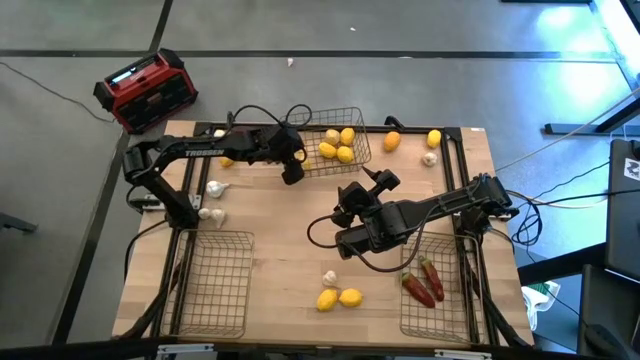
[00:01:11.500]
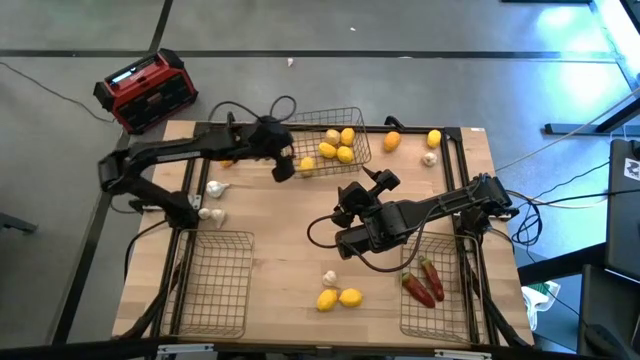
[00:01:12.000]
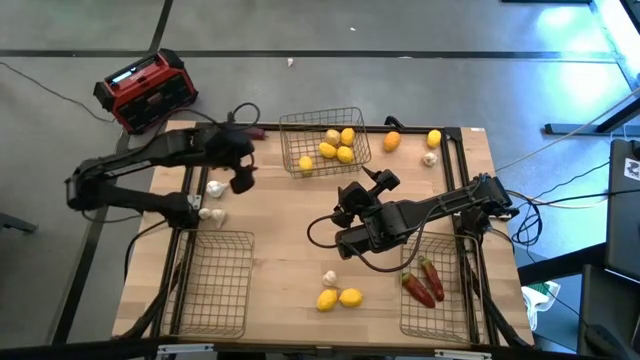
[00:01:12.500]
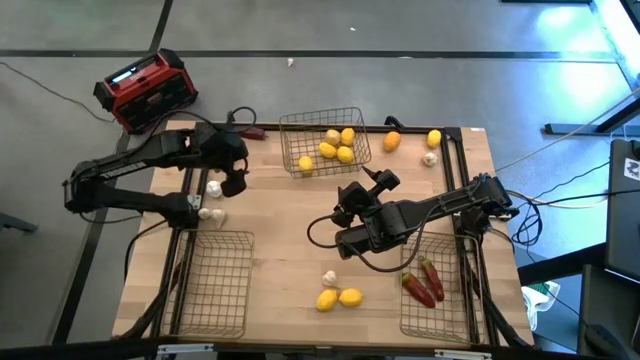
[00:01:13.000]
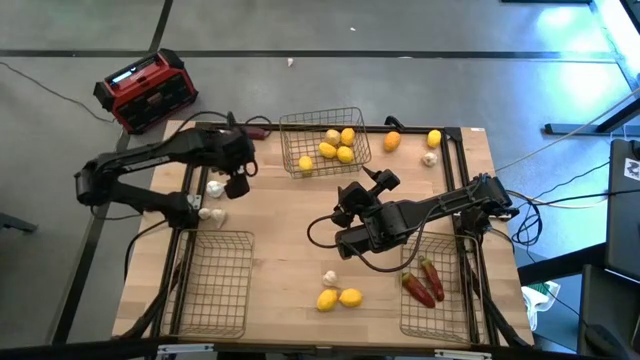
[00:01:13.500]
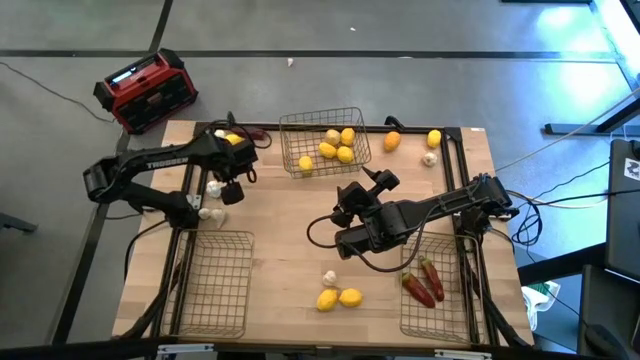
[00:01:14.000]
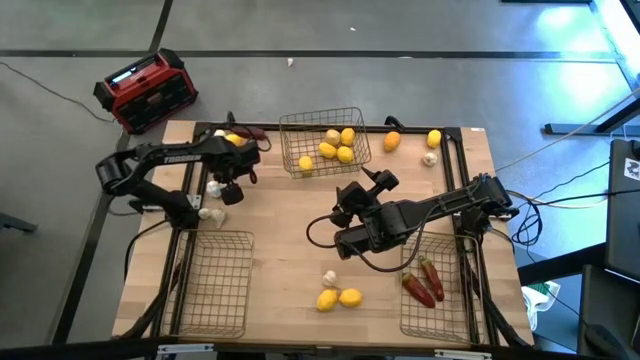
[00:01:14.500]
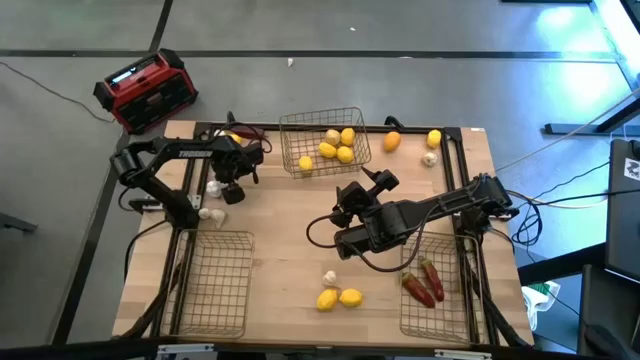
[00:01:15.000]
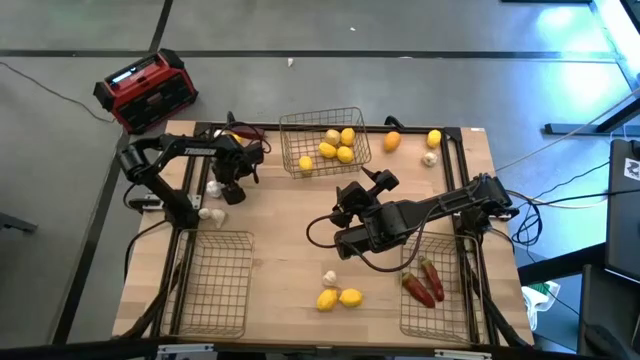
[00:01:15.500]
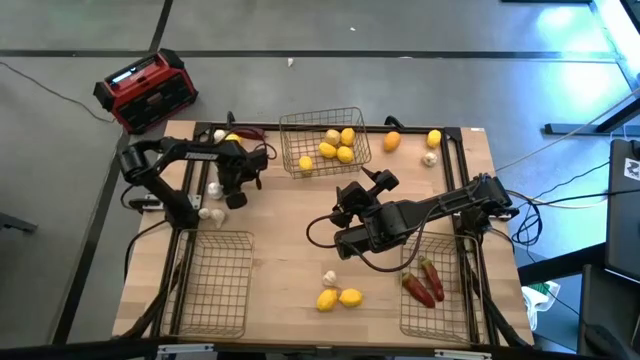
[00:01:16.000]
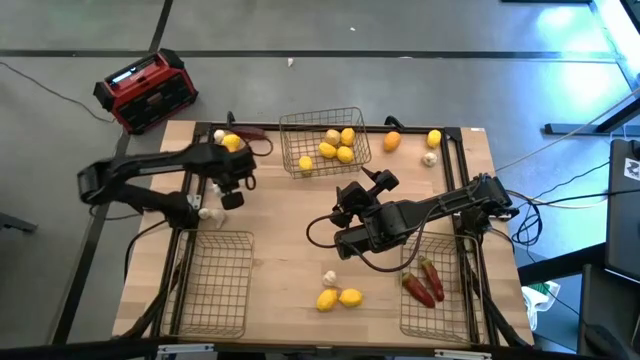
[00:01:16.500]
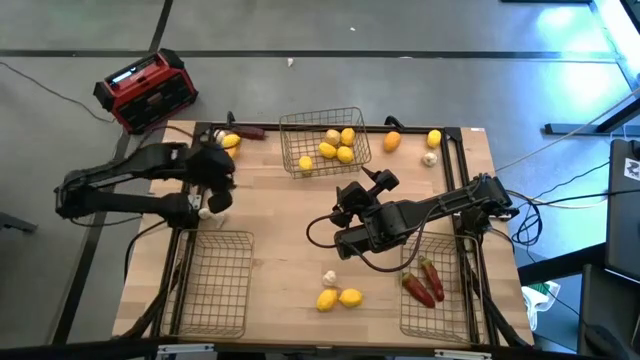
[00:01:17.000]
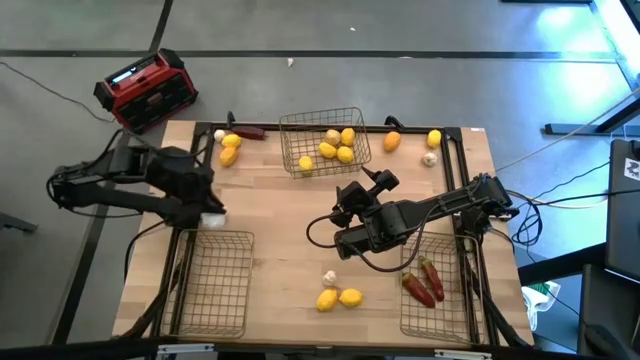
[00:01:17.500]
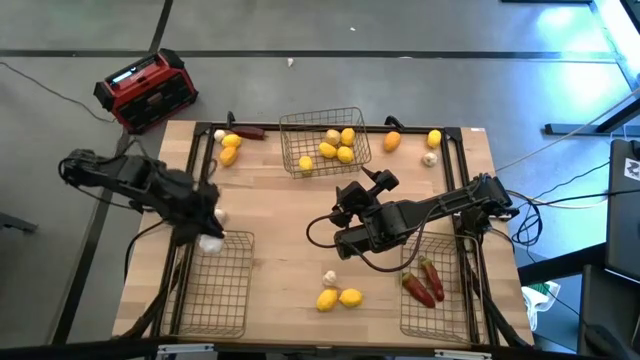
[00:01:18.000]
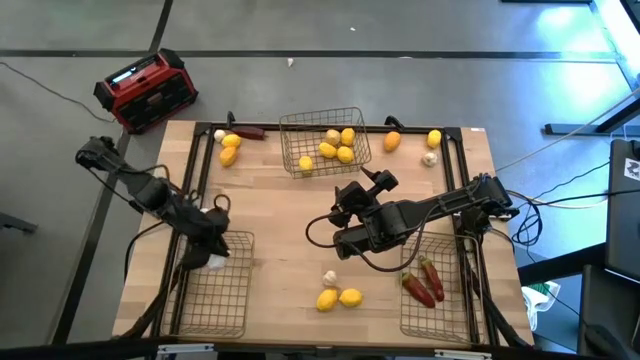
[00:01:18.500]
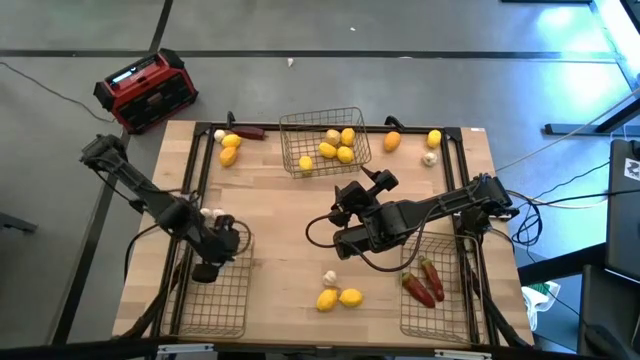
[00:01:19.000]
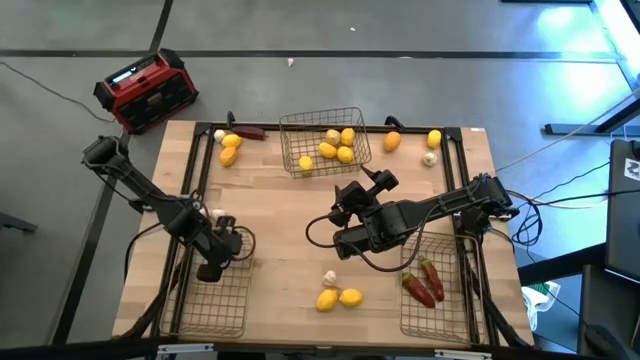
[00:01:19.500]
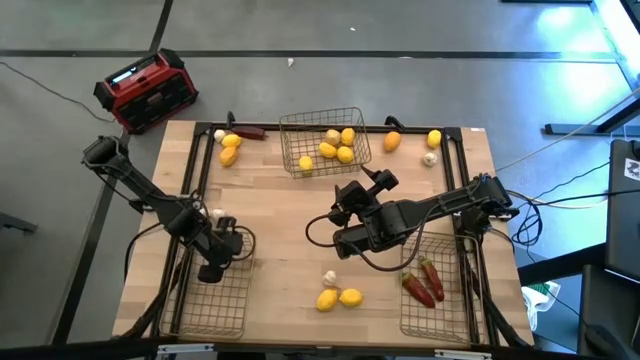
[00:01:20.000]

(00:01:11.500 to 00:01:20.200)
Task: Sort produce into baskets
Put the garlic into the bottom left wire basket

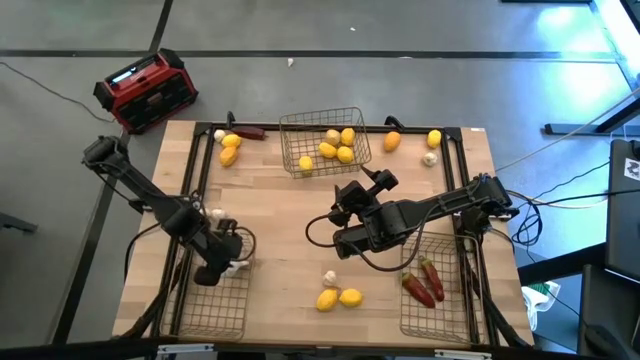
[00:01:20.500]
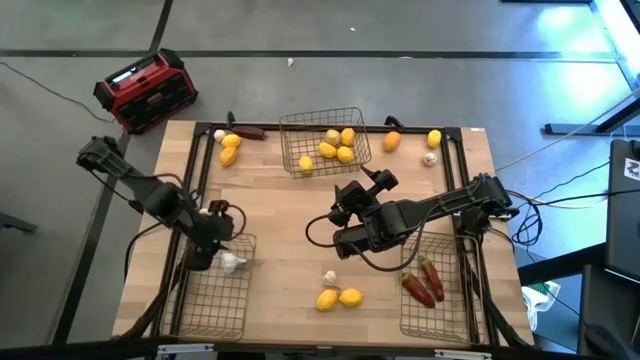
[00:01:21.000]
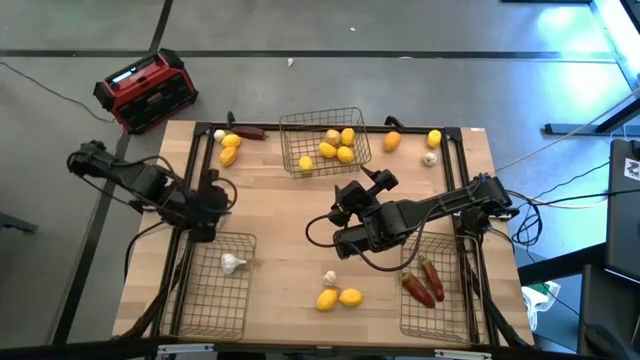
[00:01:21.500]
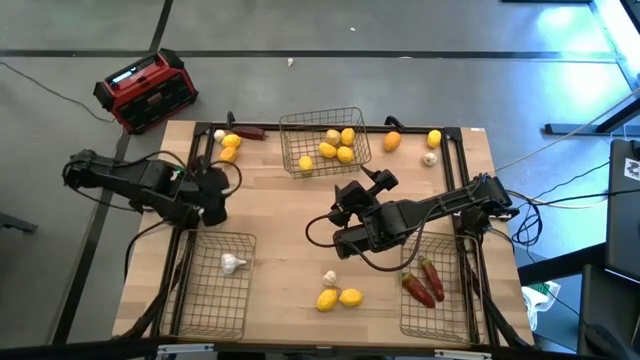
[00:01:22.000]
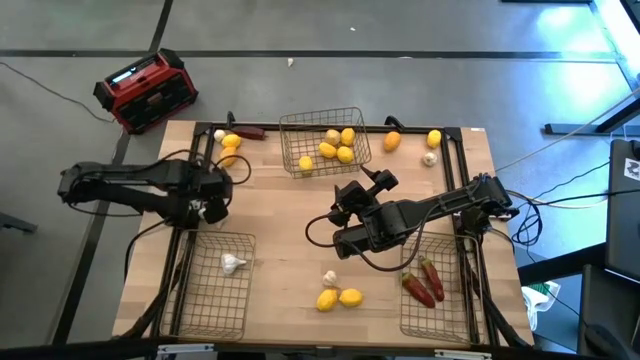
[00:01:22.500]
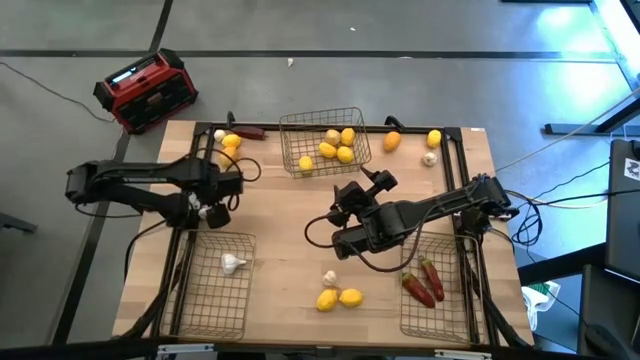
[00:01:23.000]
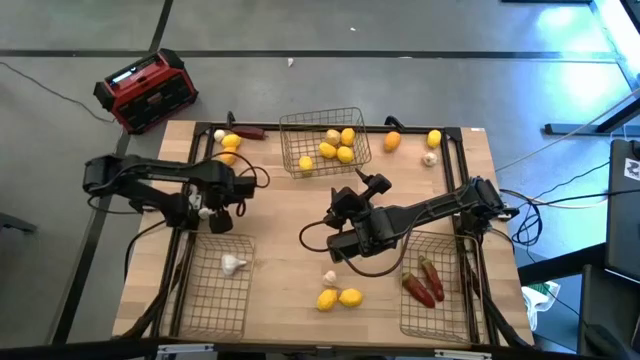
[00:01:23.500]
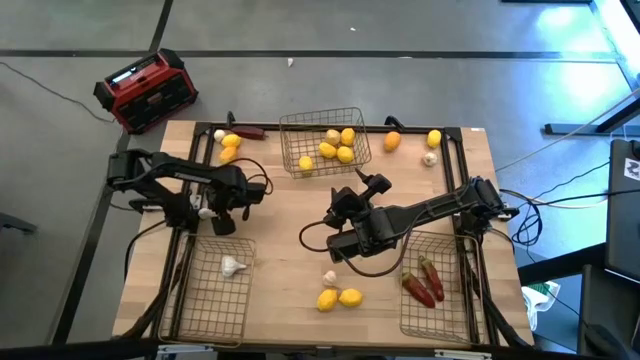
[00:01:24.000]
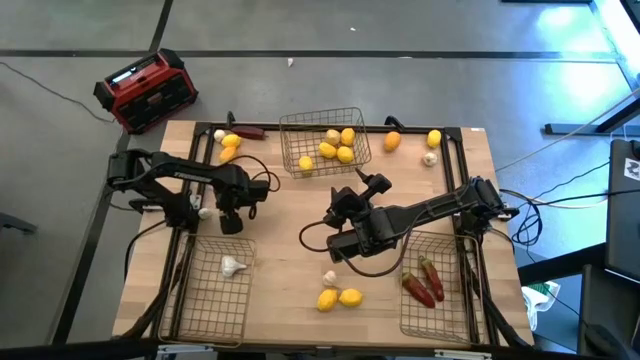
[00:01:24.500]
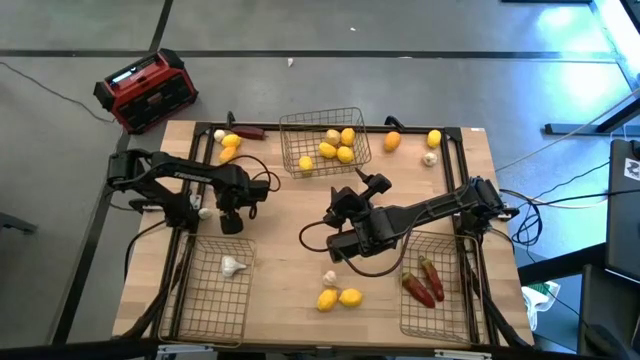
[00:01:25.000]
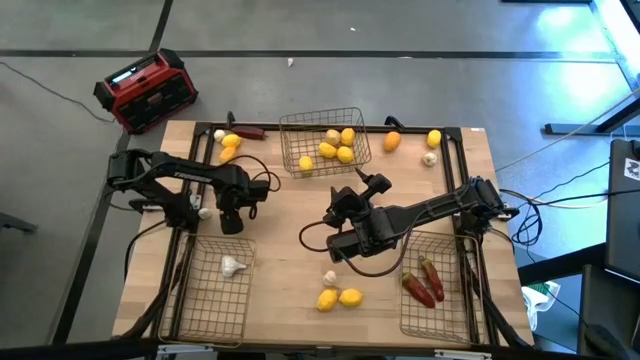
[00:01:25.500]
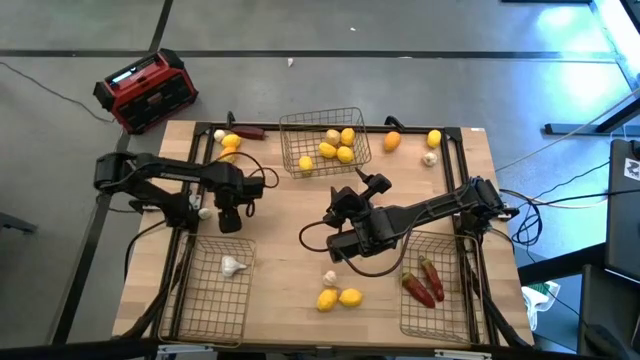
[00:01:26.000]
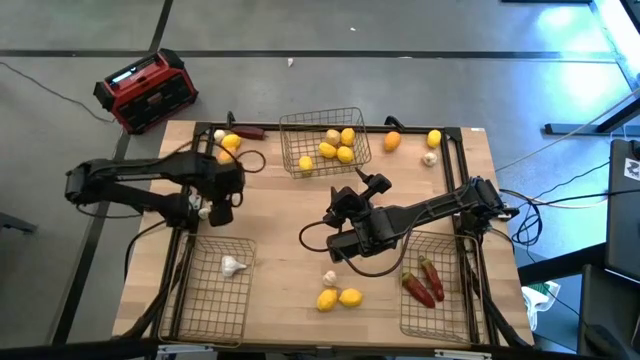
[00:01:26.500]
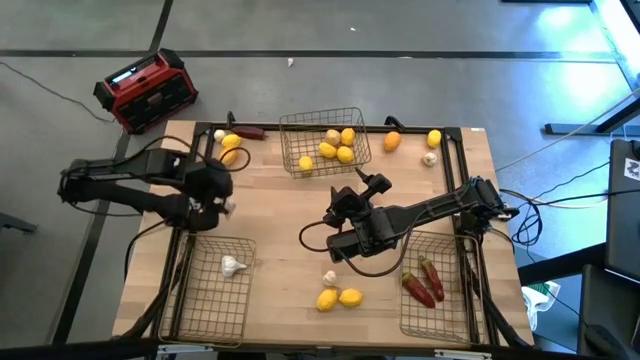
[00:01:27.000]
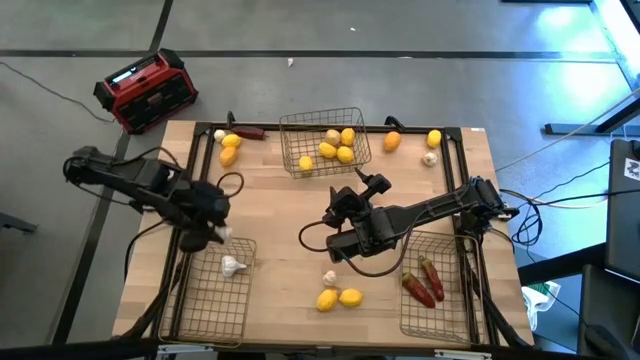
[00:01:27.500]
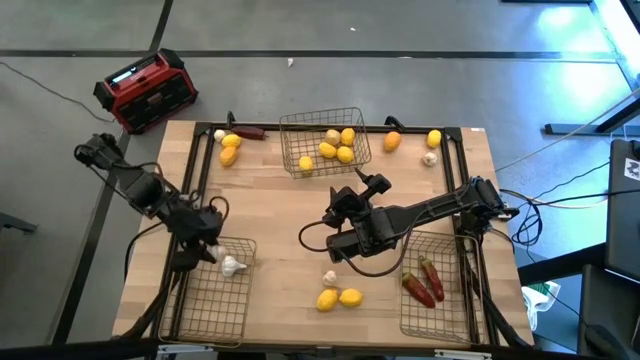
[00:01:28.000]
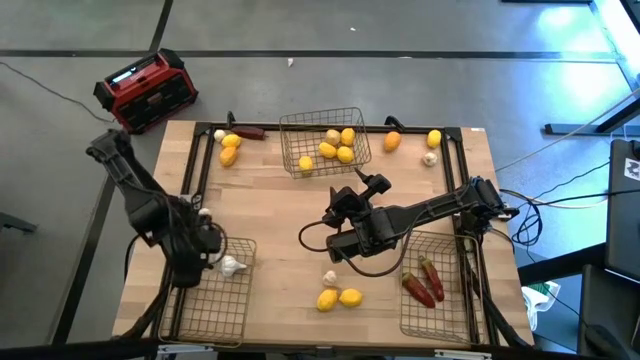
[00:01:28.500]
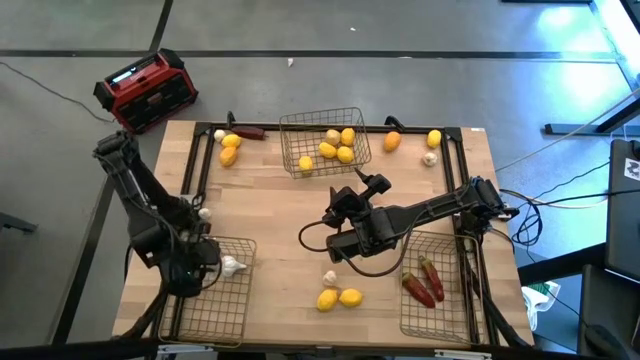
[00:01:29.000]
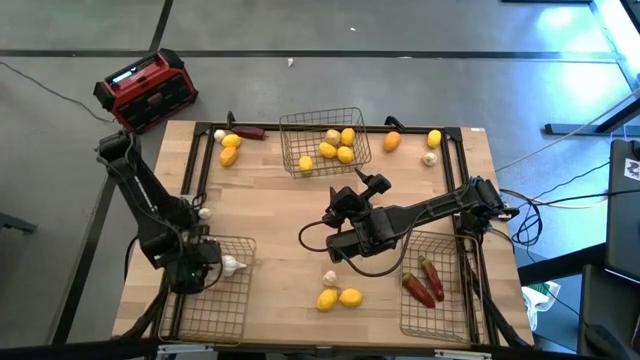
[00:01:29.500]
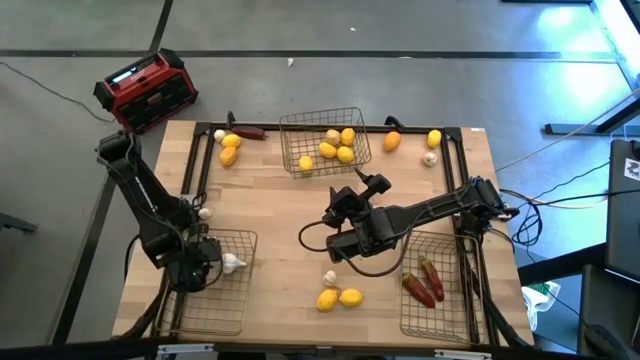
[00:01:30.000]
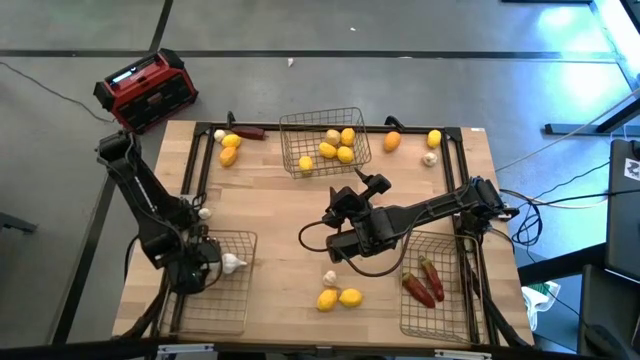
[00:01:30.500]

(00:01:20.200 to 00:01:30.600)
Put the garlic into the bottom left wire basket
